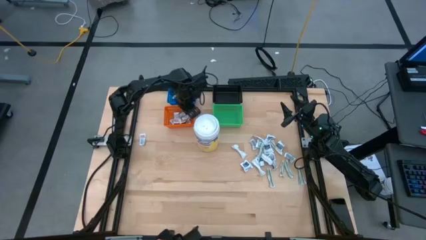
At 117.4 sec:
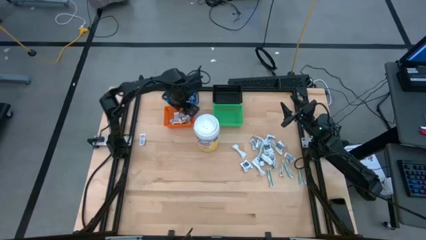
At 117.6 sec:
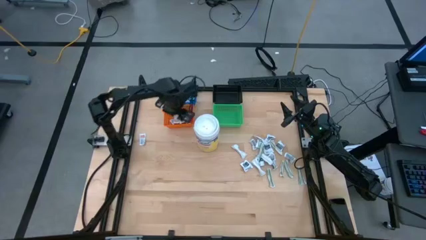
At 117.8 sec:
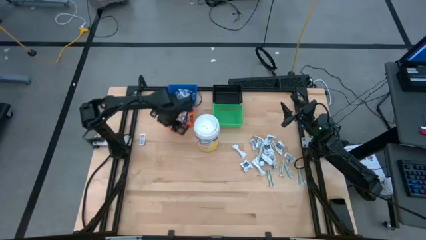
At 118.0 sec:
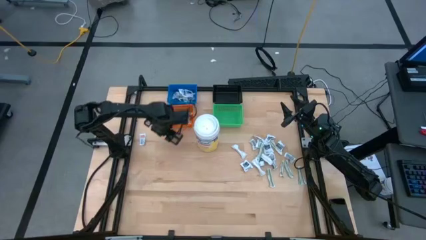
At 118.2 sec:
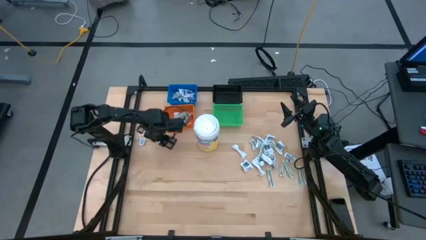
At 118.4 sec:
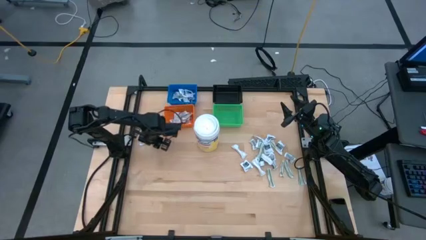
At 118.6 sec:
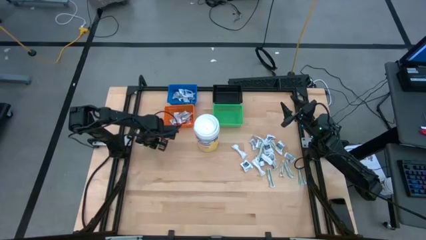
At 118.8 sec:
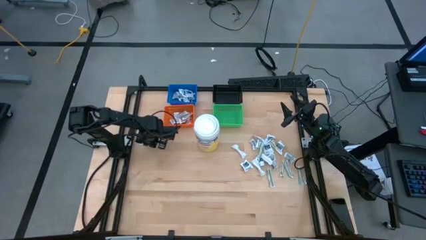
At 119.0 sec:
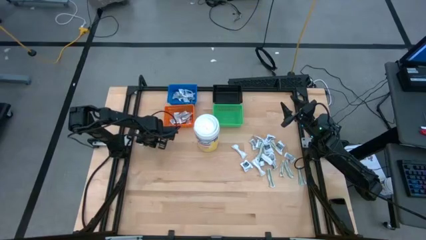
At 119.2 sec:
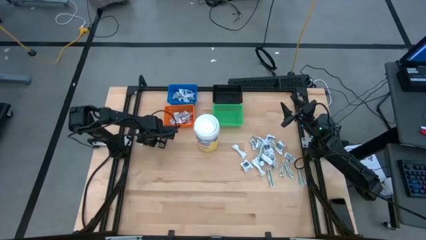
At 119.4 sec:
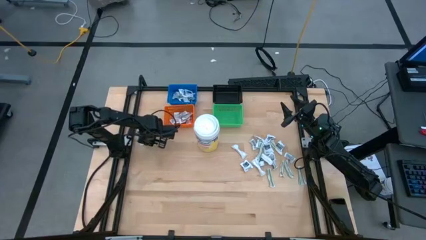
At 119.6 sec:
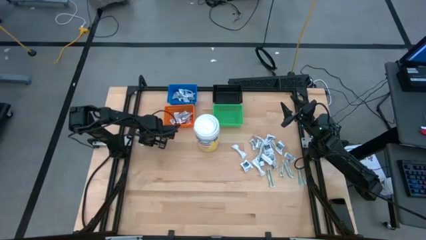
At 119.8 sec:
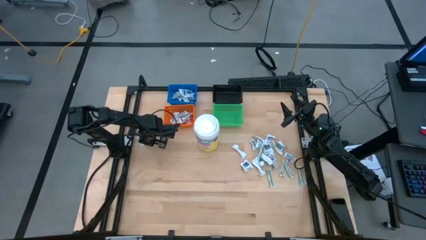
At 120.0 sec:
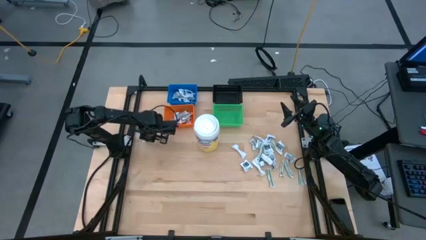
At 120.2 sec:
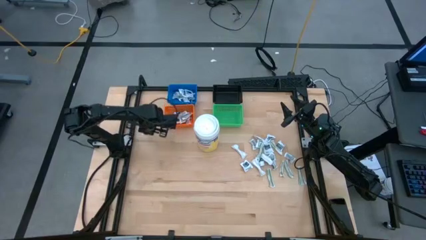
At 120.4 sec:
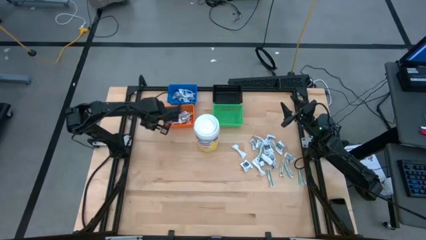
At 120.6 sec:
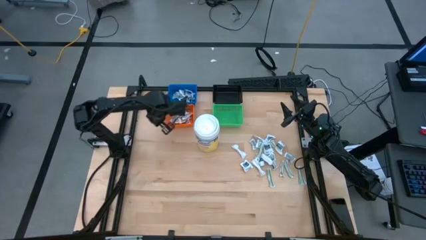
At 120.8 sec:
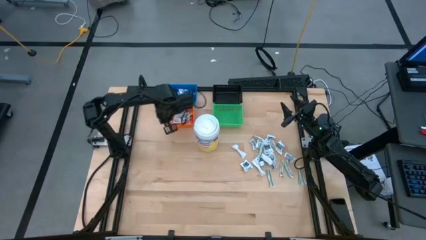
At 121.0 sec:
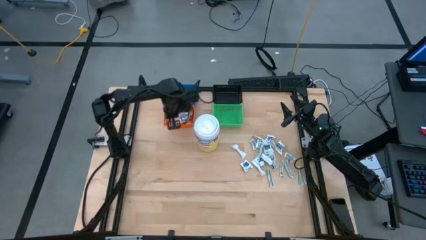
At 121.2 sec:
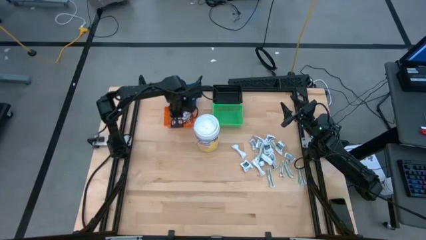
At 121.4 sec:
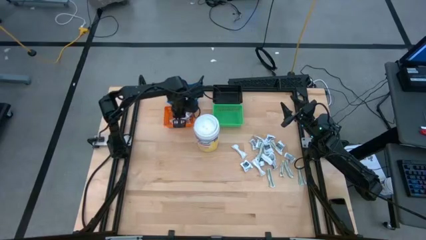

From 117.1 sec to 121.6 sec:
Task: Pick & Place First Aid Supplies
Put the orange ointment pack into the orange bin

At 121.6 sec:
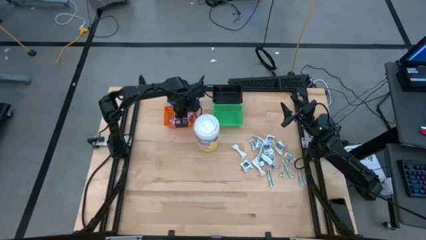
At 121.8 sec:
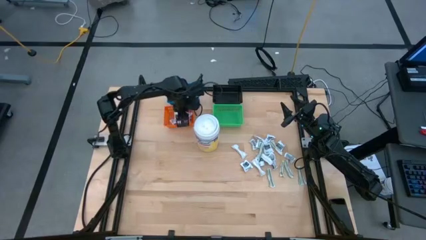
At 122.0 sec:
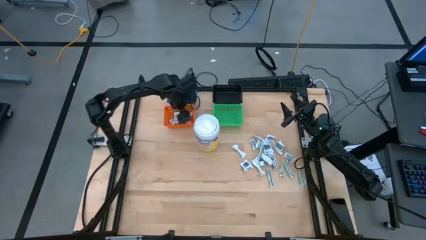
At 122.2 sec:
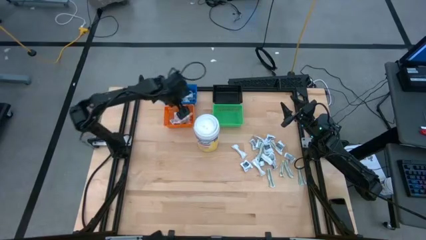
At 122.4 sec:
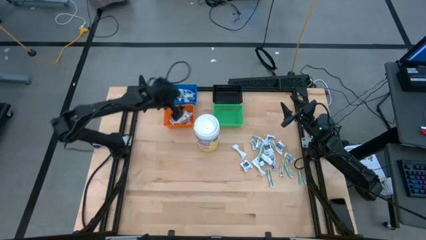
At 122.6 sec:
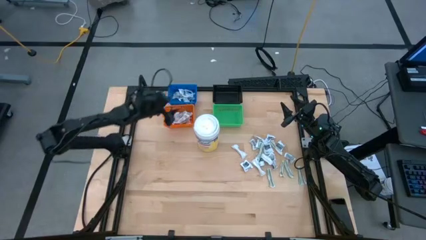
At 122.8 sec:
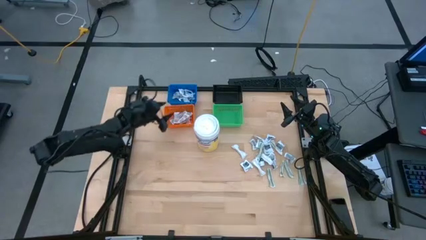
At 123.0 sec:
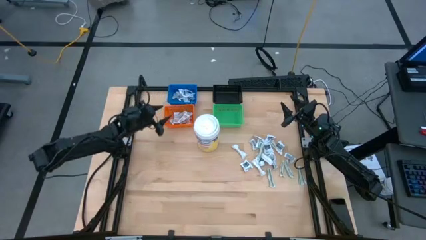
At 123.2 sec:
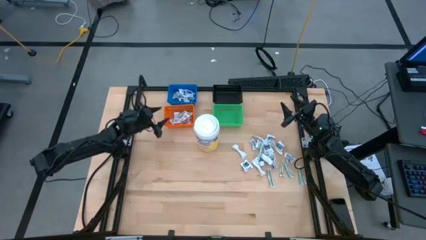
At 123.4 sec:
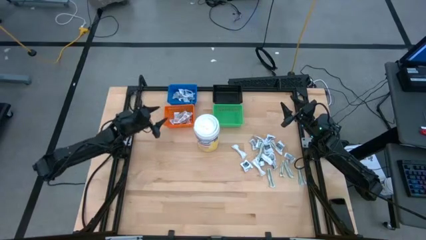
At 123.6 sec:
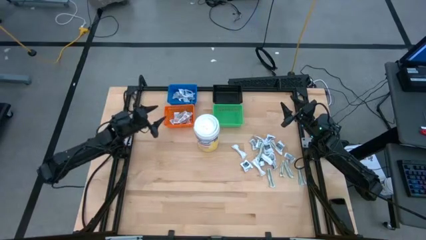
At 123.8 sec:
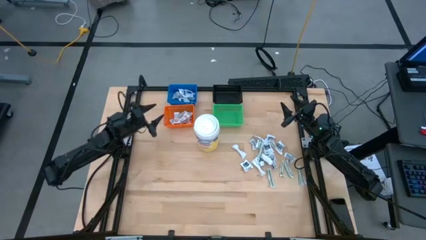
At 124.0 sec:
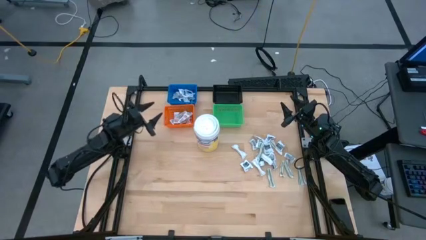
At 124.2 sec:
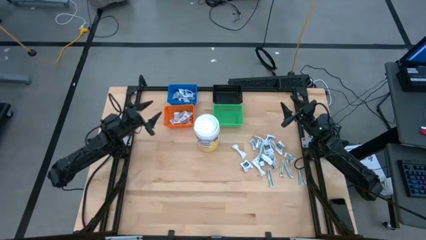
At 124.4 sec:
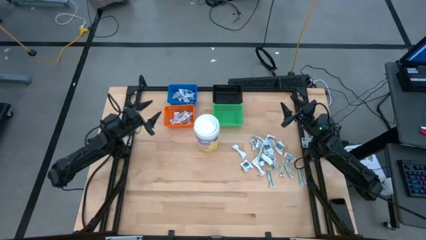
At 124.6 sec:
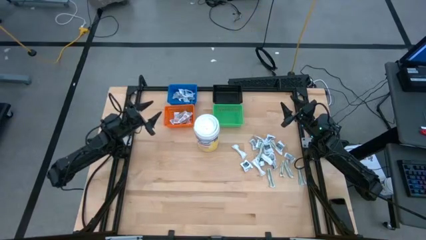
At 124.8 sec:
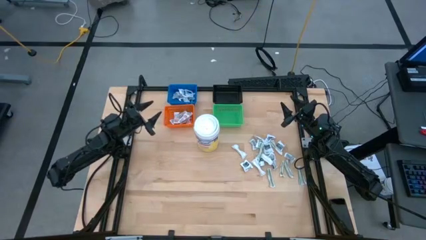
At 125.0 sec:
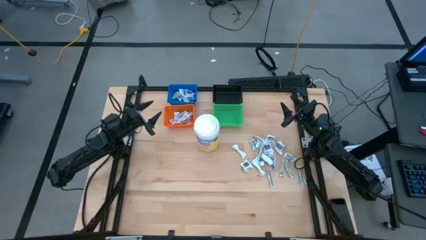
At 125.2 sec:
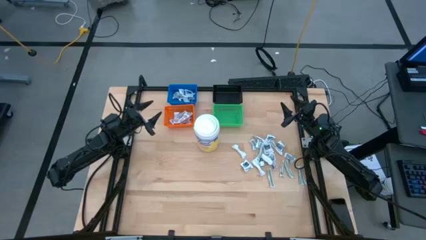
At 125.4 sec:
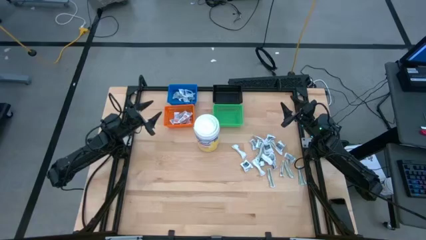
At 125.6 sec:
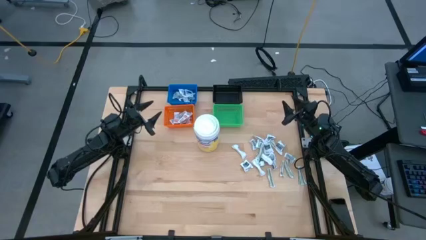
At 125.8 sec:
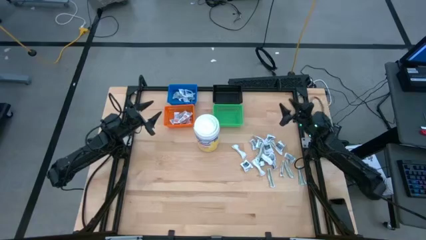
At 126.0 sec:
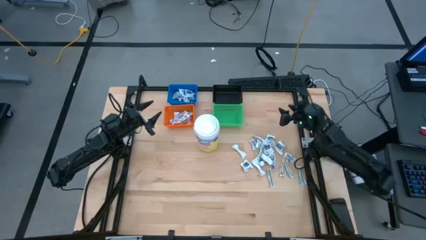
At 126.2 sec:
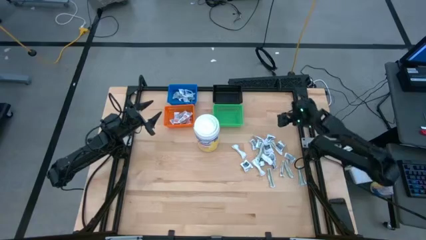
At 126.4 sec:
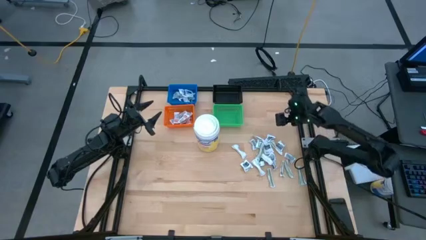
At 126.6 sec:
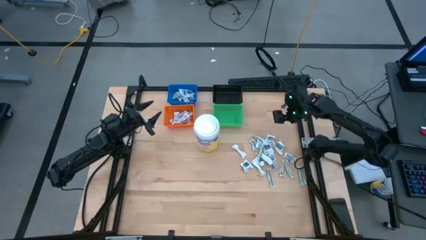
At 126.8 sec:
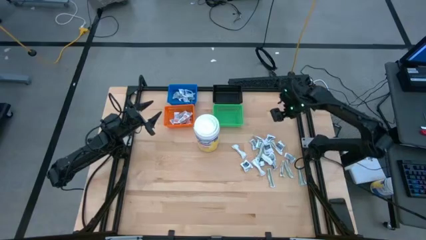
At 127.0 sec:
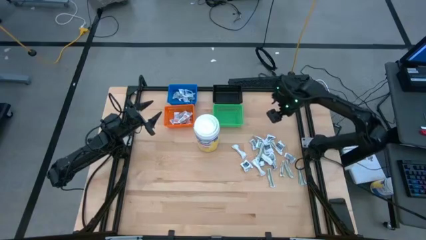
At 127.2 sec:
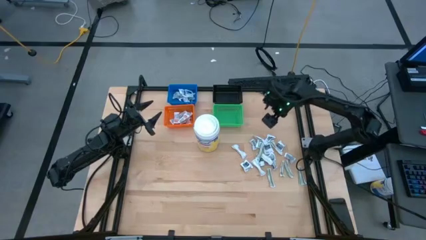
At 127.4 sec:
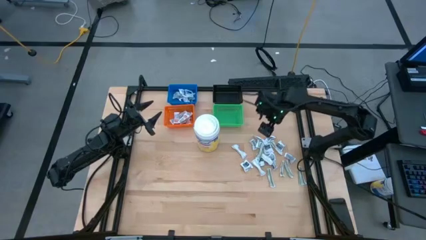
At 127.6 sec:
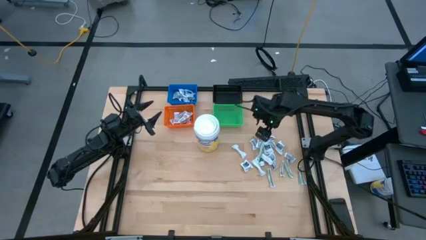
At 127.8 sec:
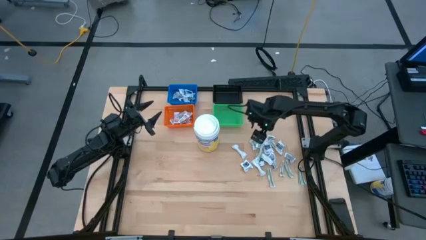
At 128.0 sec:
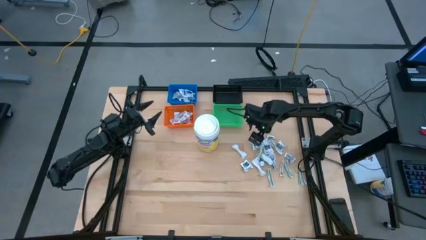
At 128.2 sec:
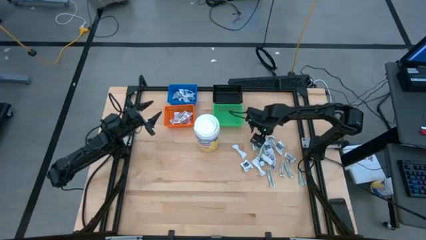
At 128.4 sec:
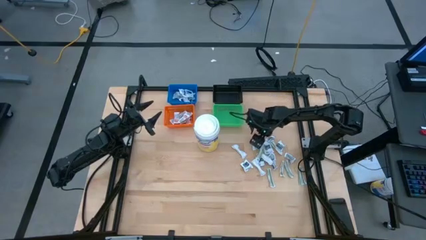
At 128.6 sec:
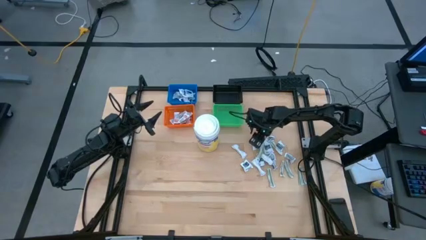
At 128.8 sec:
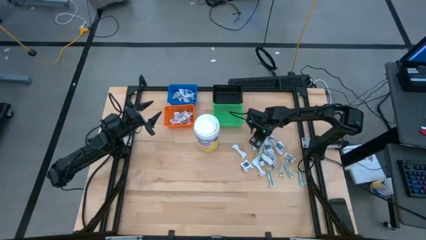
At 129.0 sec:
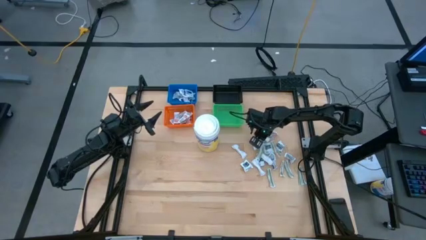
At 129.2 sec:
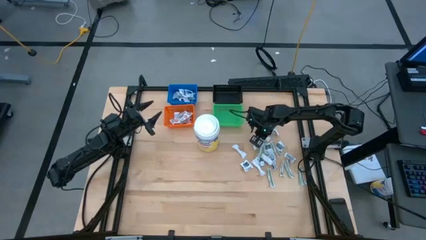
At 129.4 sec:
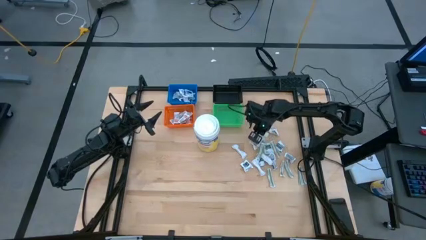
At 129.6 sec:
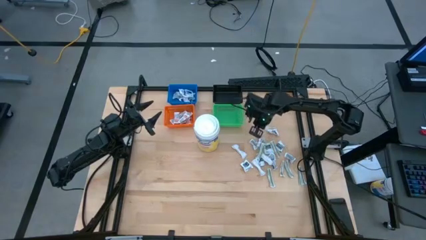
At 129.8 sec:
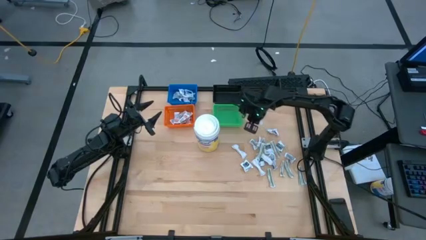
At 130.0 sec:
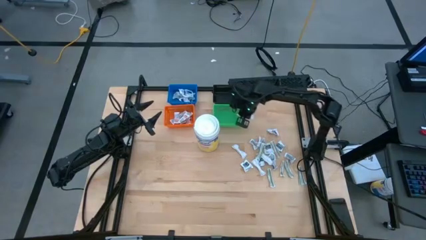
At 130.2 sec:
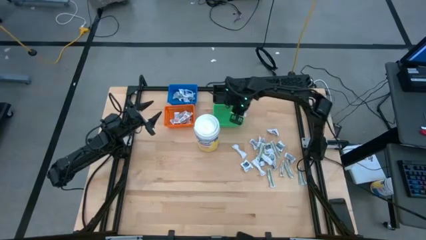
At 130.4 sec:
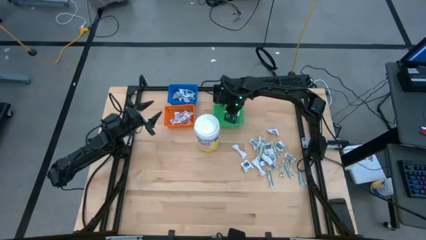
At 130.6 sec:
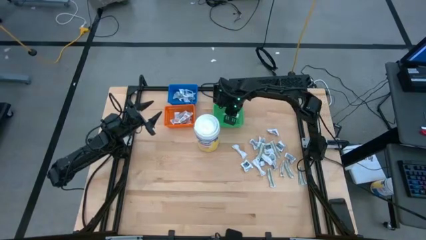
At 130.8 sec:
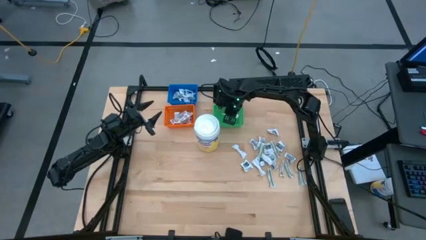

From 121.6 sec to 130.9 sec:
Put the green bandage into the green bin

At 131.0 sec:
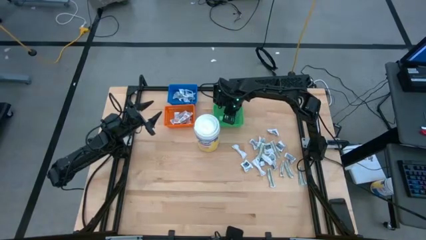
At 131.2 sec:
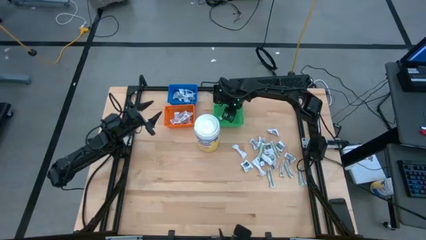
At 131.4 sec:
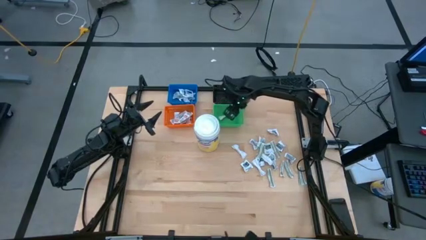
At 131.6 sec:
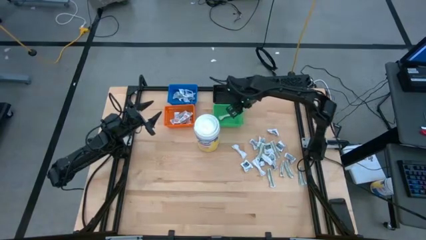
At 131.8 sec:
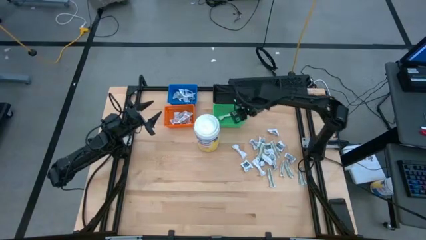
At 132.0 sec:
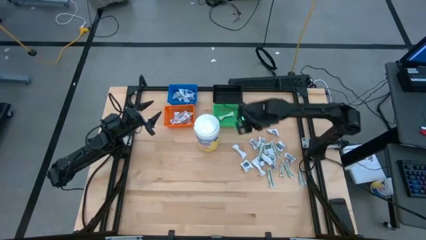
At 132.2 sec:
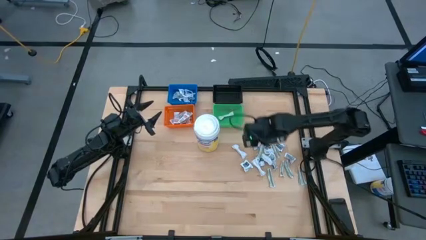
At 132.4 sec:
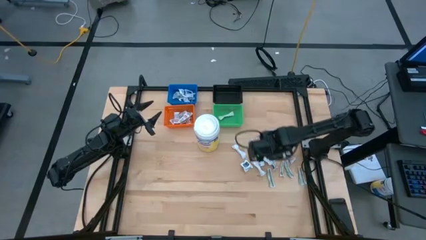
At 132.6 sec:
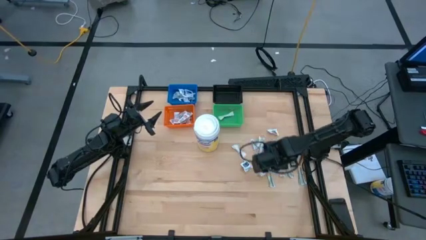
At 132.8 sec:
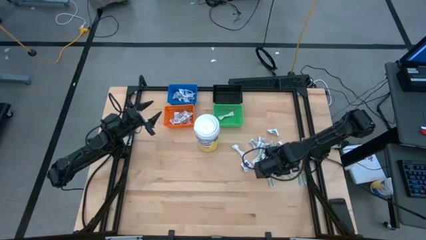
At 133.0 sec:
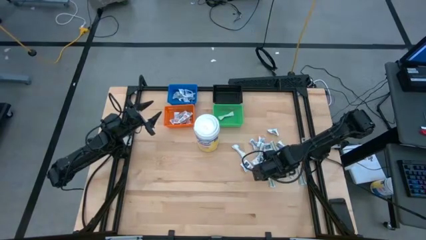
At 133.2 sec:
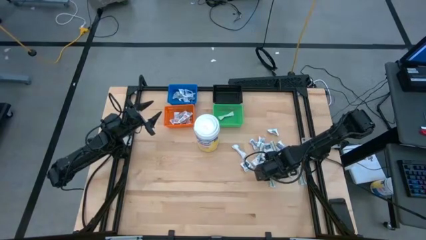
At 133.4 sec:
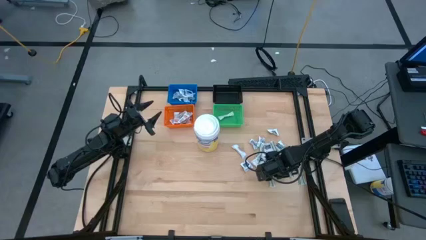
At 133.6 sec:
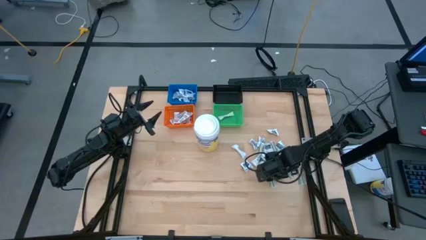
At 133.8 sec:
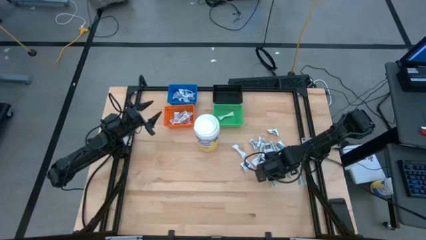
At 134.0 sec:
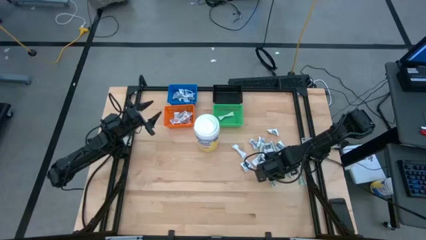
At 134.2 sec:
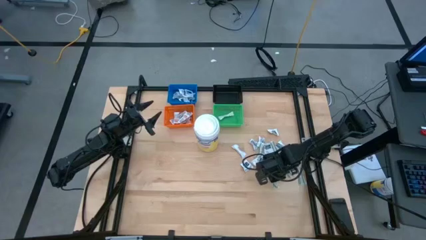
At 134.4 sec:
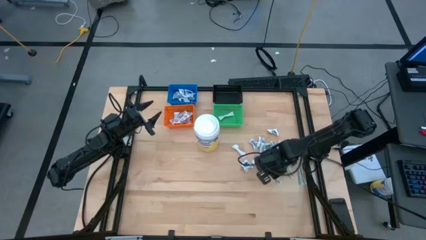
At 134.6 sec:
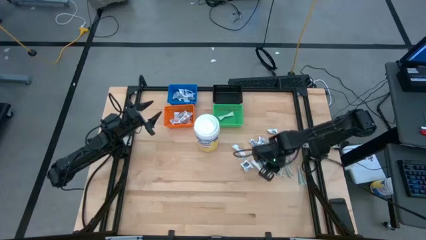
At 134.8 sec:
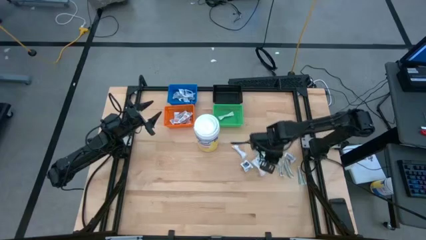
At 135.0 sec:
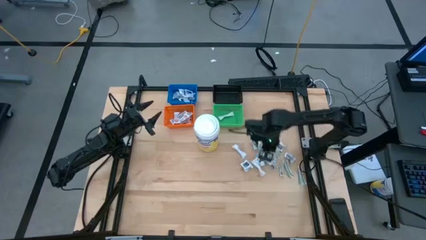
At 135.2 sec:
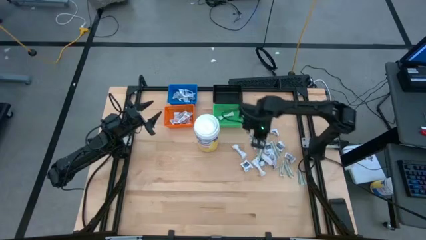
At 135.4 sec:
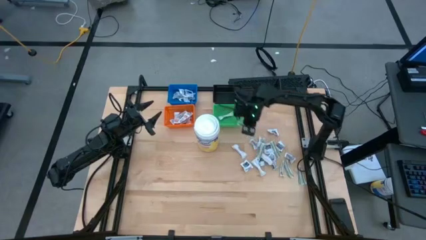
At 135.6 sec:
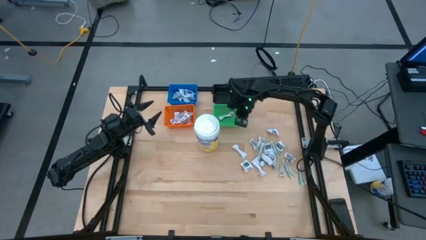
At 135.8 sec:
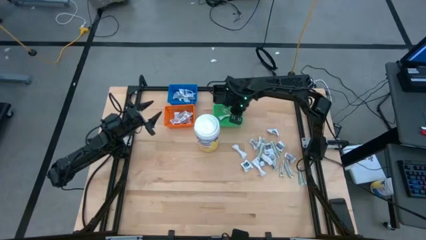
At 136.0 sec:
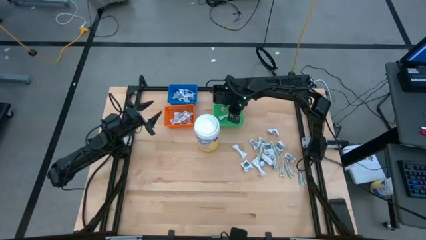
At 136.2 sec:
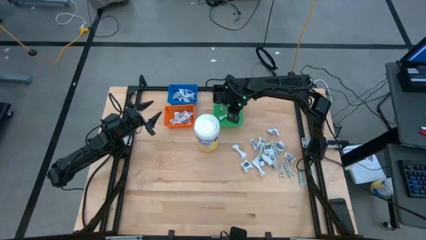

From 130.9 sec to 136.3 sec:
Put the green bandage into the green bin
